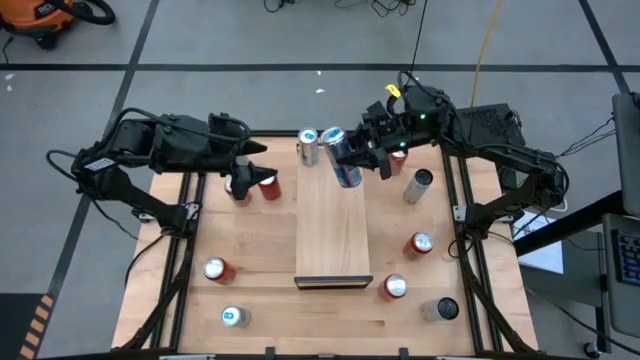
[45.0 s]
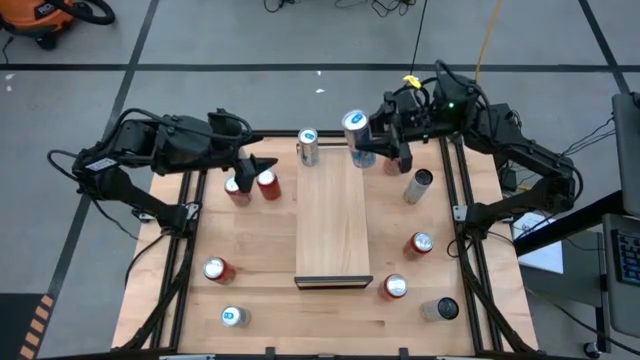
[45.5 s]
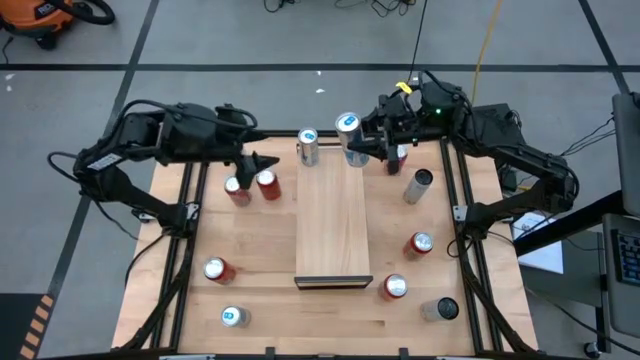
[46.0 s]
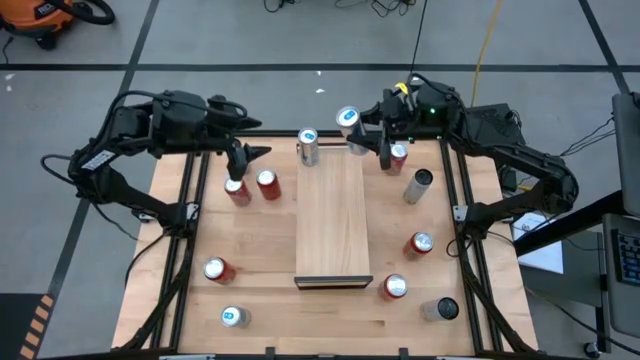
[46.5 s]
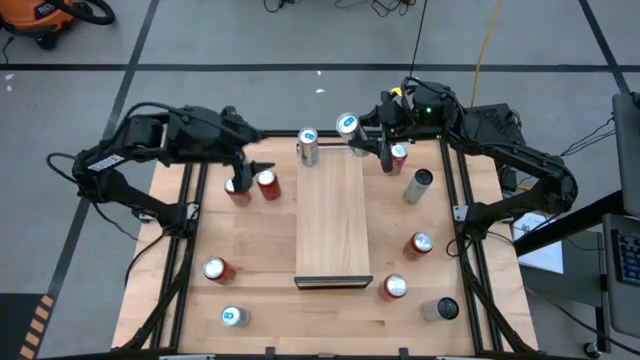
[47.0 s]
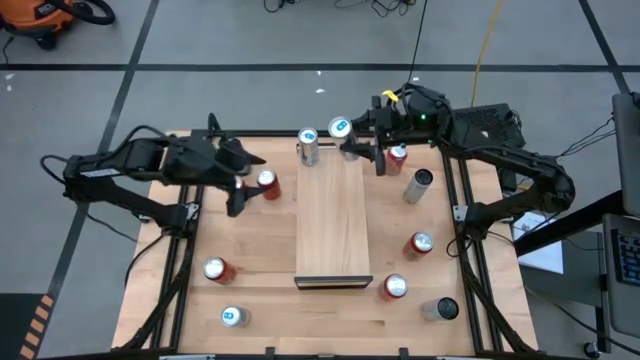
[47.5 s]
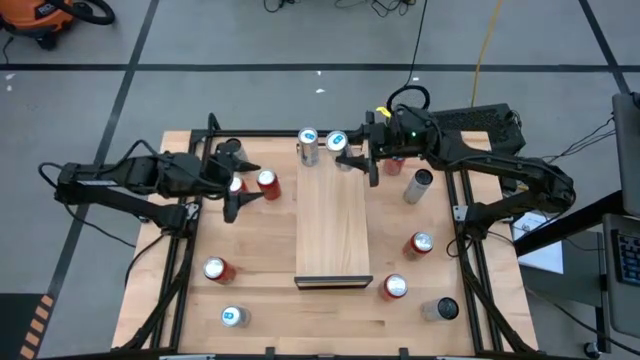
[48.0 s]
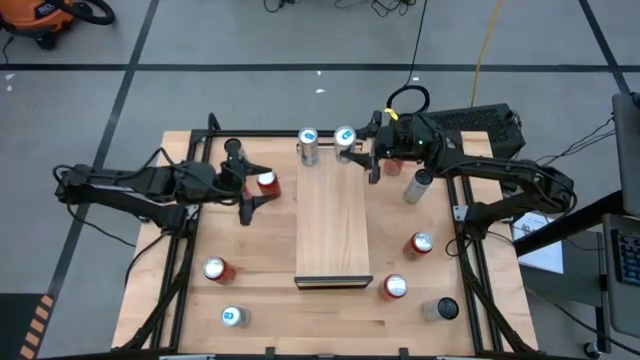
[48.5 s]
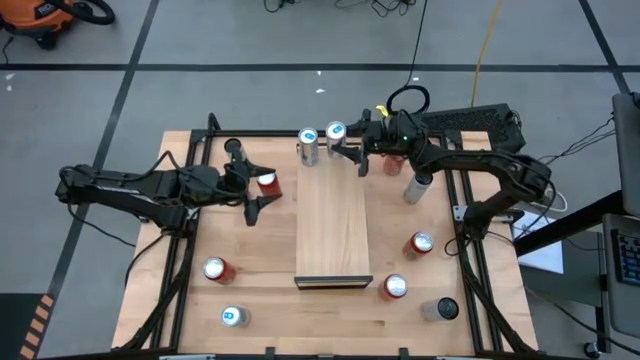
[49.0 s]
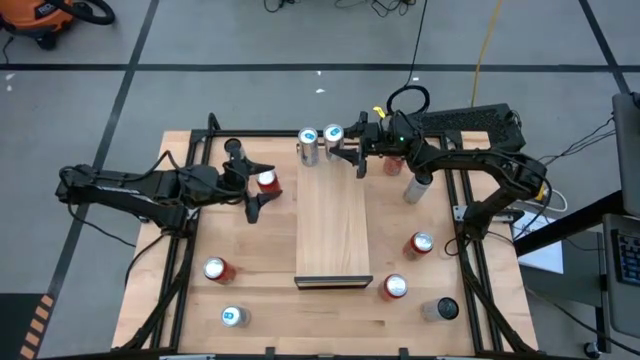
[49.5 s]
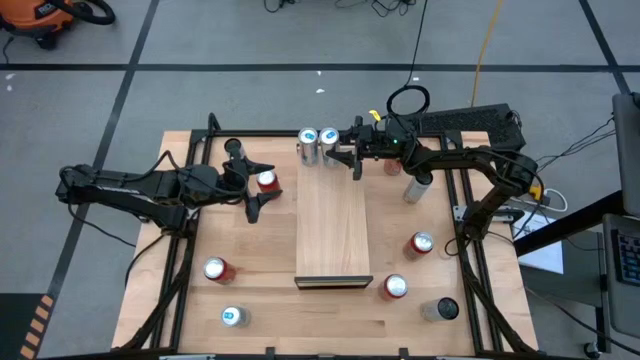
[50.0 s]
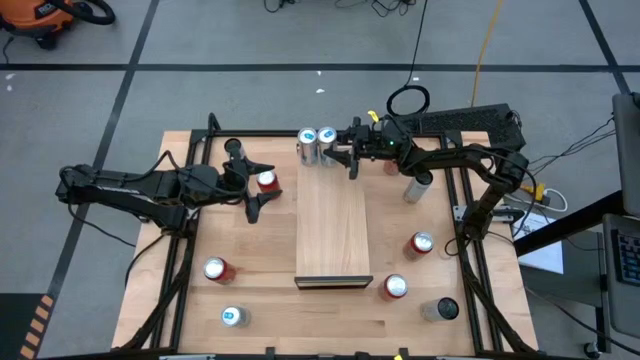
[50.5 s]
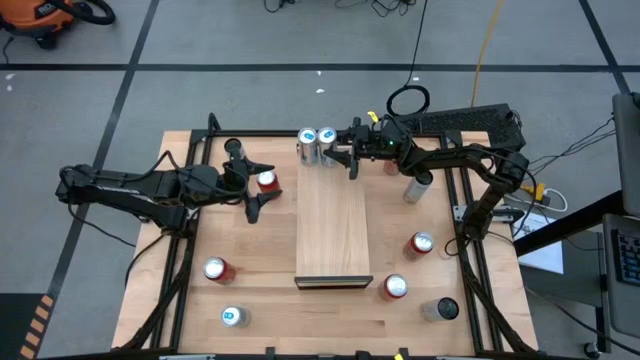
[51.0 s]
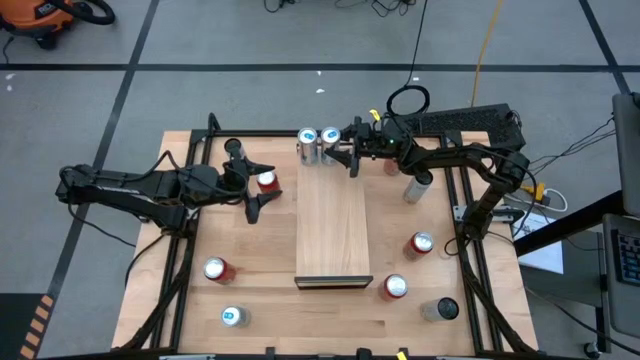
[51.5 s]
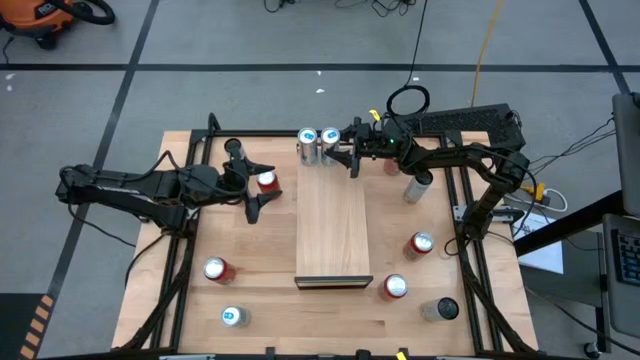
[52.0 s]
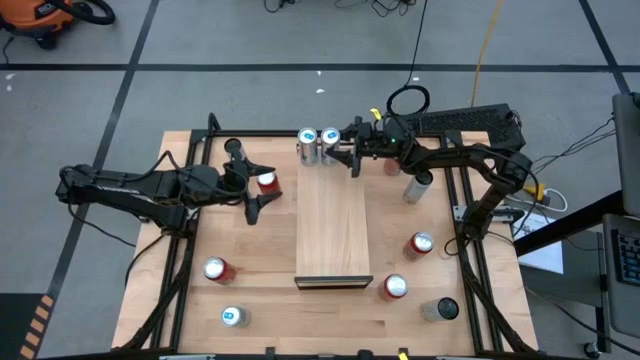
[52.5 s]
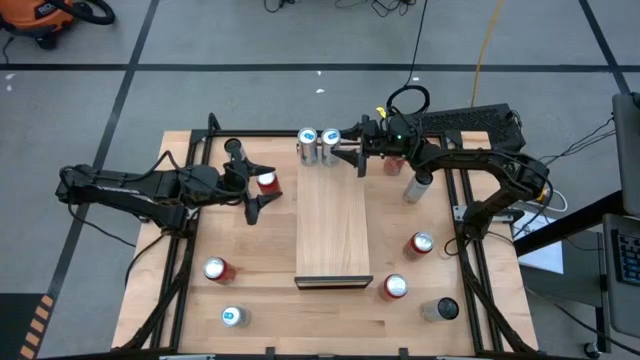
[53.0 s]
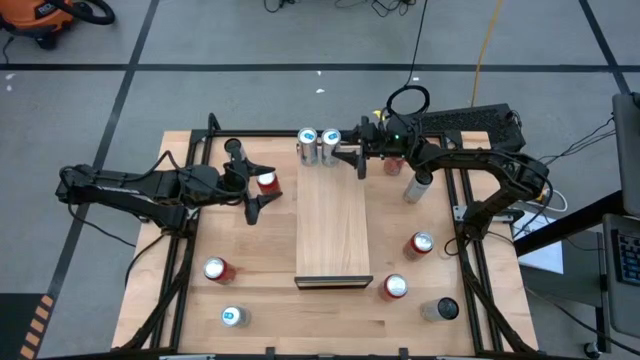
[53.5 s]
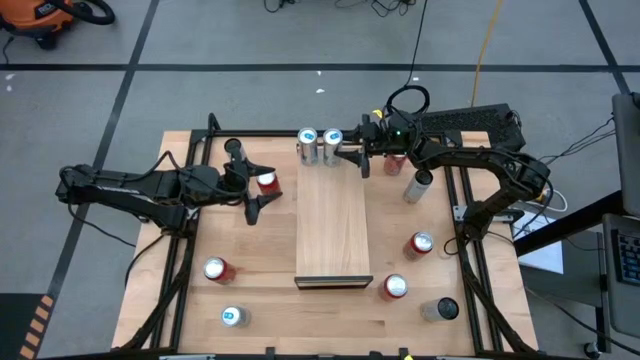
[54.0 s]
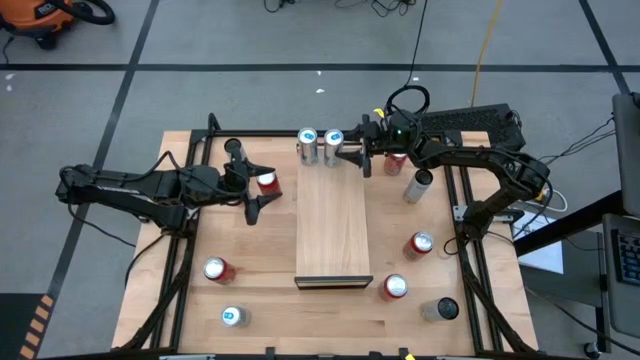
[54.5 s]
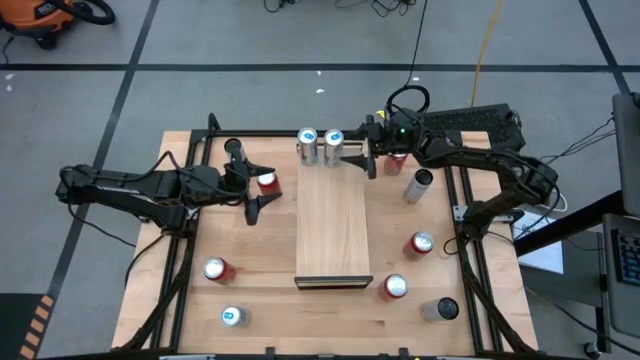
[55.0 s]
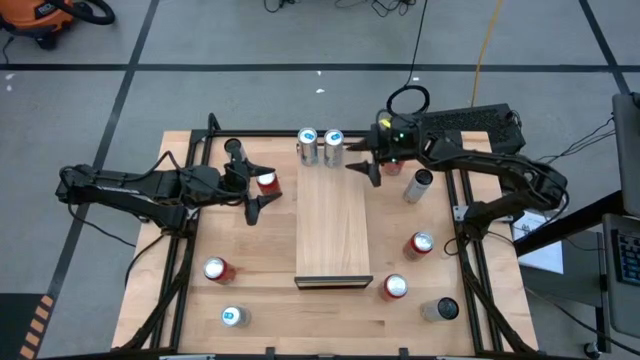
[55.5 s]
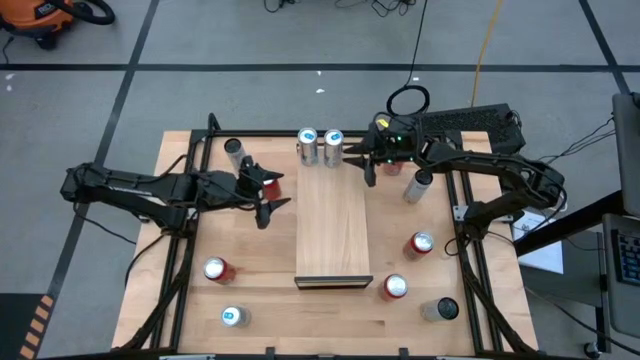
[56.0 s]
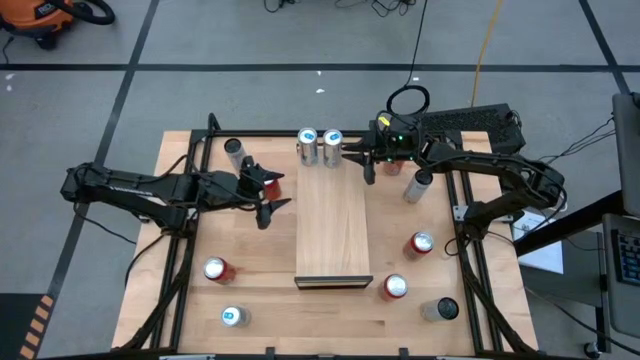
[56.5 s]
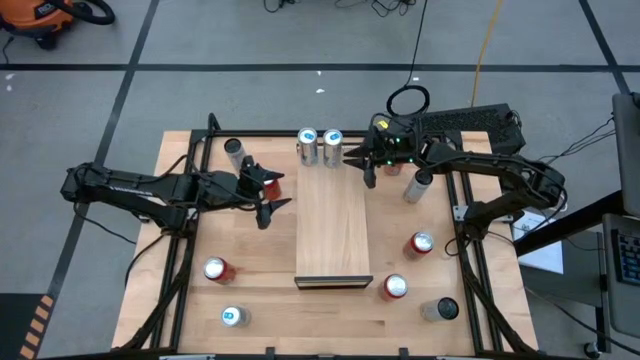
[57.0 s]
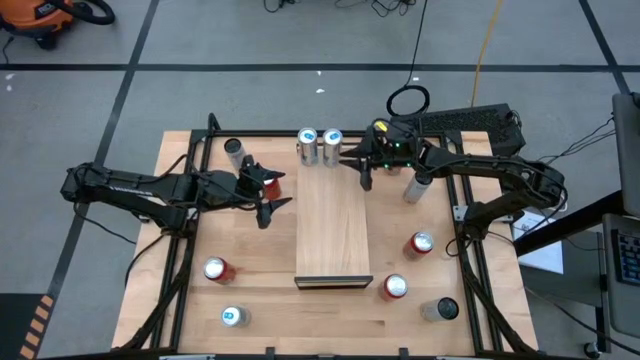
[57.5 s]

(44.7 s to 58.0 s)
Task: Place canned beverage on shelf
Put the top blue soda can on the shelf aligned with the other blue soda can

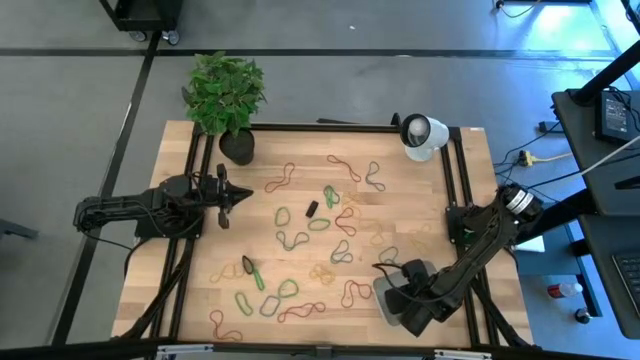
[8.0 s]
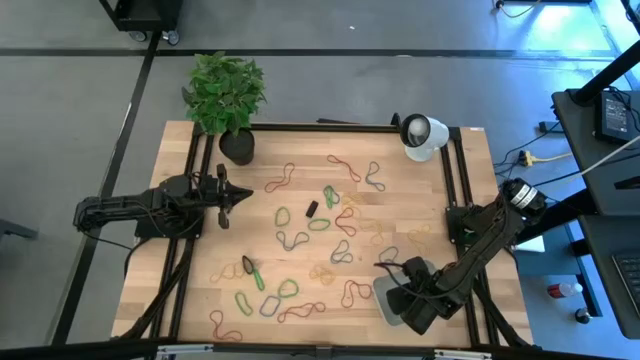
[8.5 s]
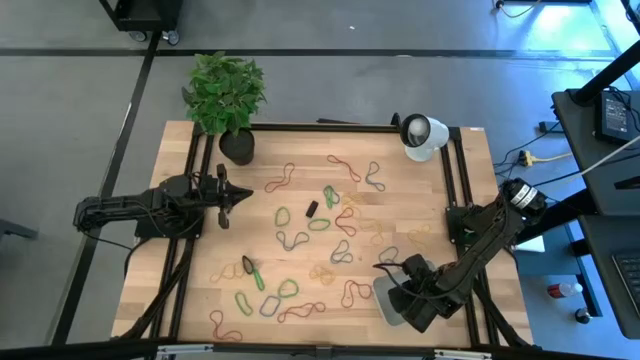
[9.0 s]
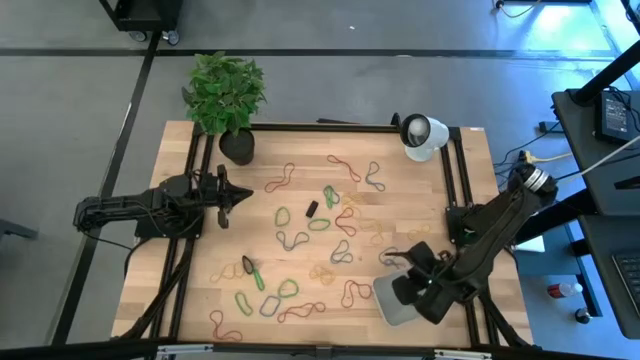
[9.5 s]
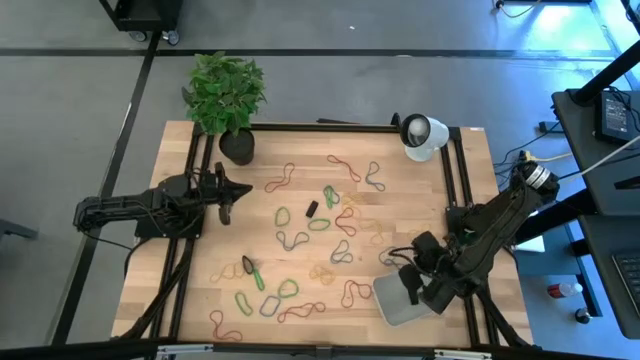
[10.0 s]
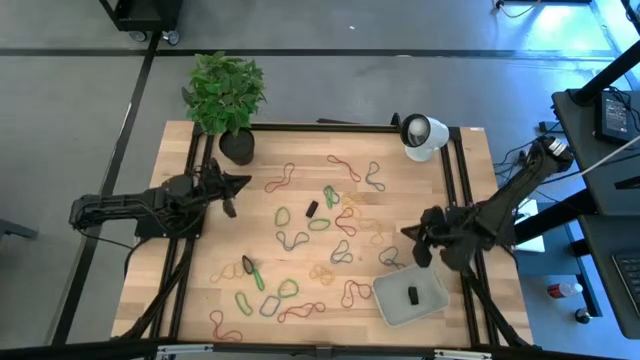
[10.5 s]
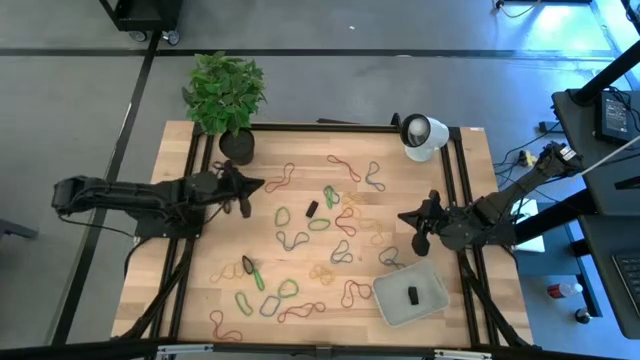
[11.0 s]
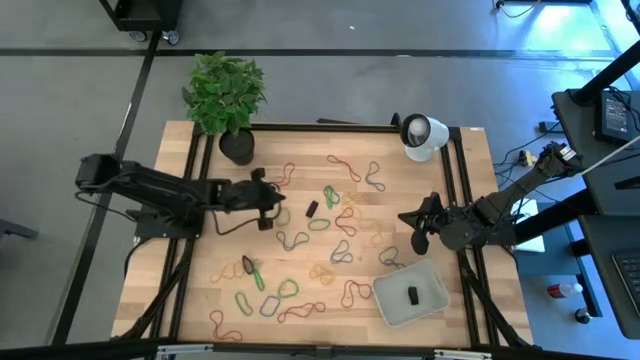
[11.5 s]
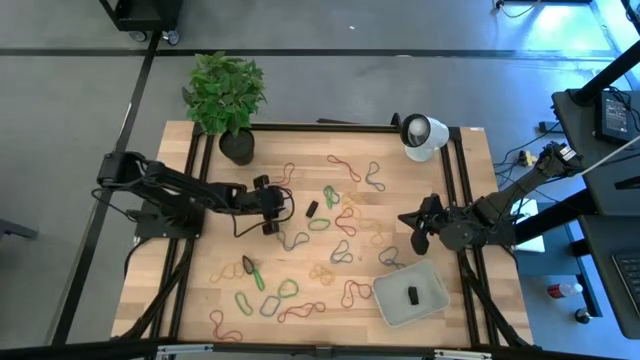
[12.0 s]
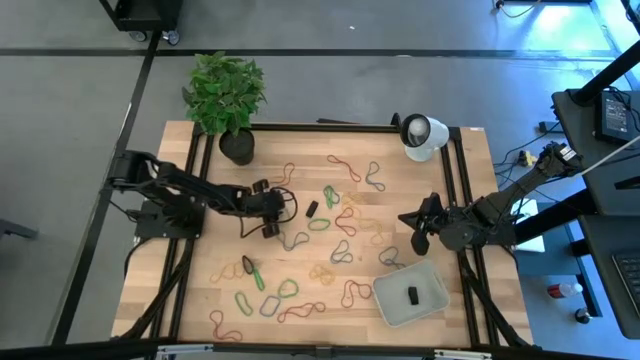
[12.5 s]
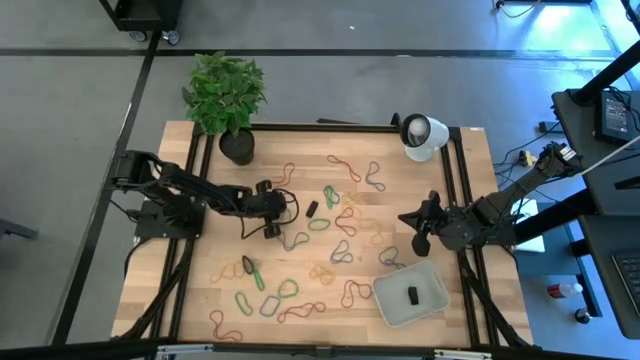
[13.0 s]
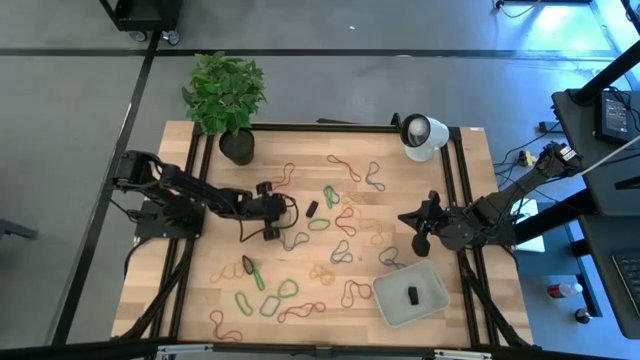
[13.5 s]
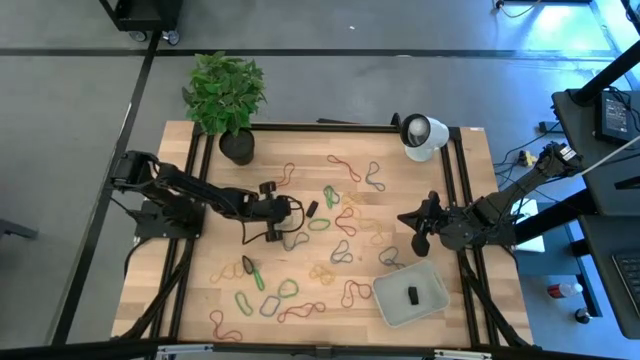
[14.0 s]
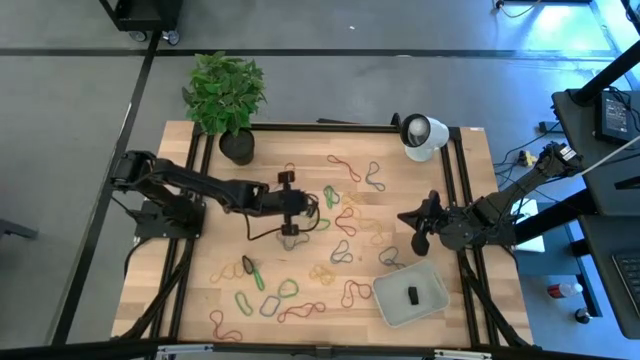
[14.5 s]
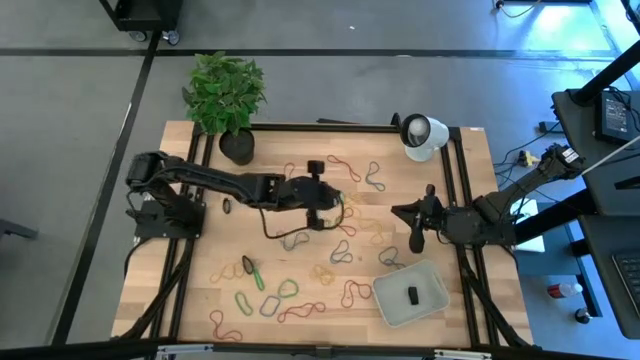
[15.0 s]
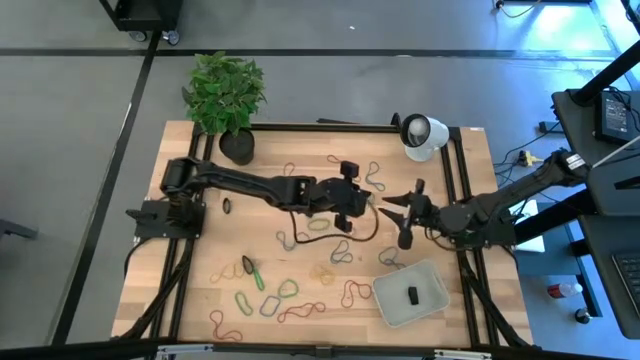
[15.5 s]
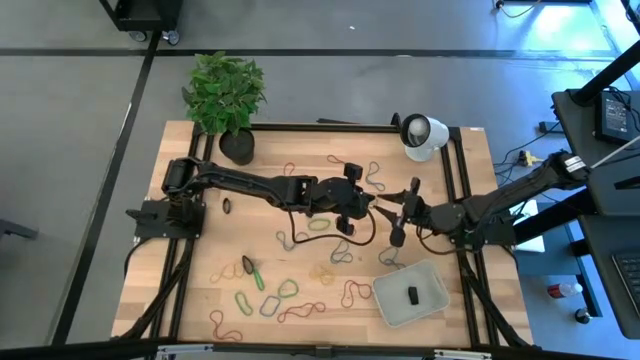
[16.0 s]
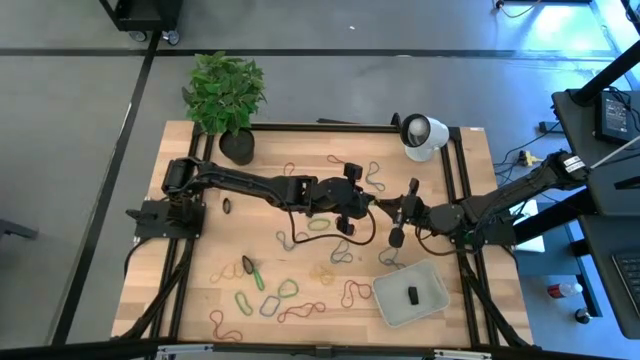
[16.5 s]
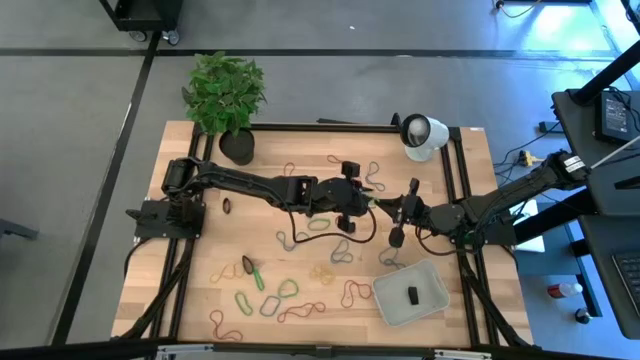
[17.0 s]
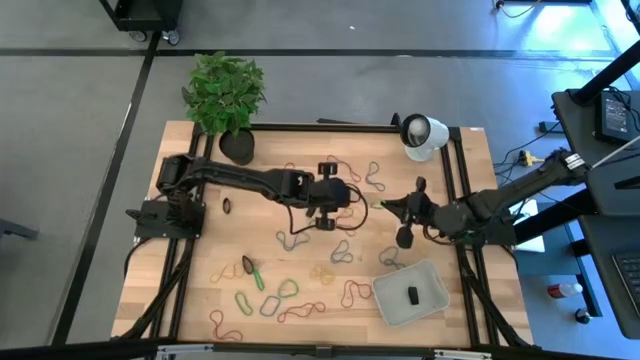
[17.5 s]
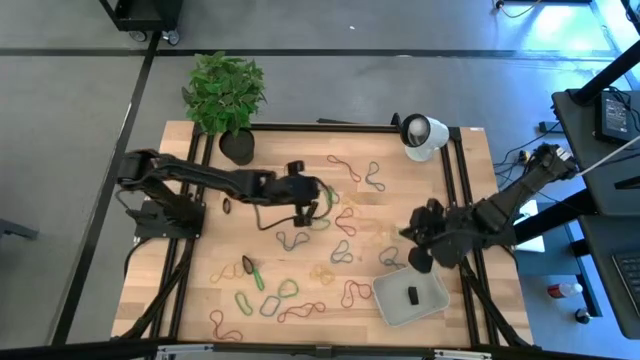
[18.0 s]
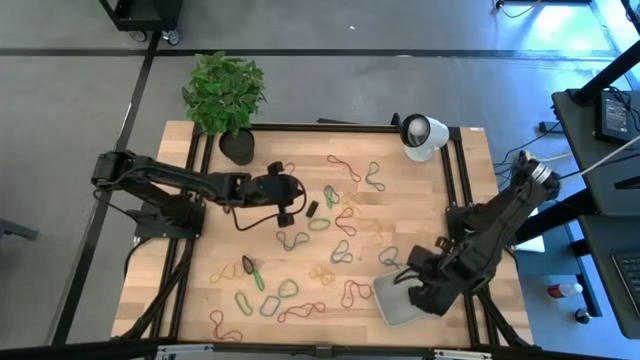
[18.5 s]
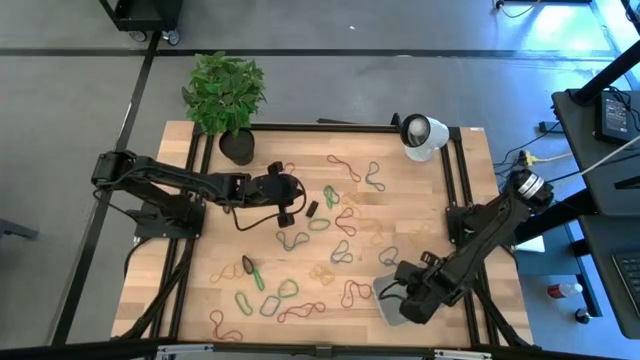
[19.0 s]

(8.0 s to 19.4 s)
Task: Pick and place rubber bands into bin
Put the green rubber band into the white bin
